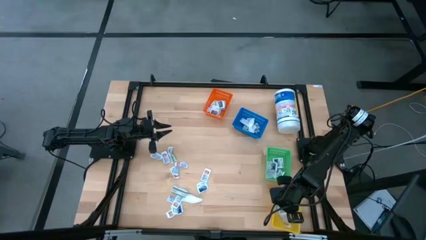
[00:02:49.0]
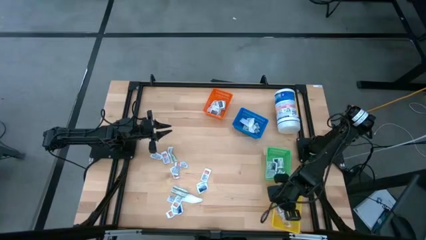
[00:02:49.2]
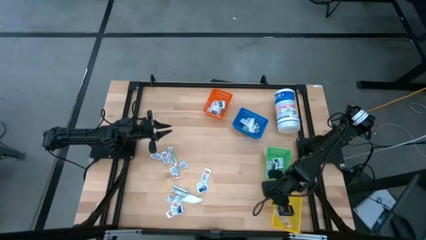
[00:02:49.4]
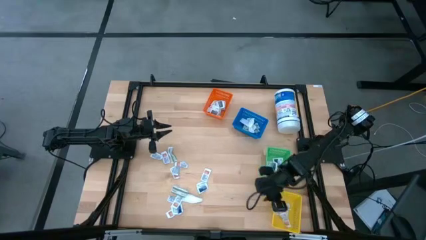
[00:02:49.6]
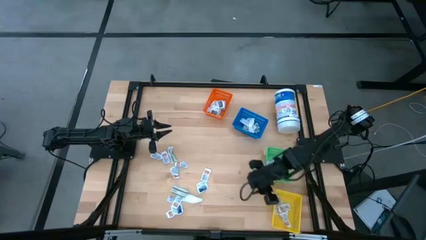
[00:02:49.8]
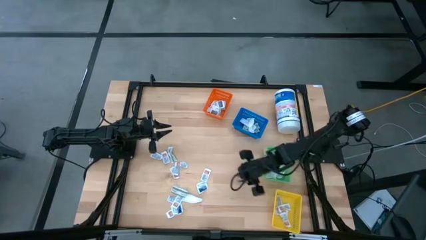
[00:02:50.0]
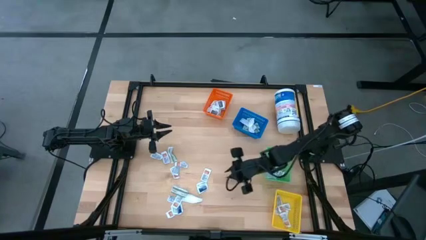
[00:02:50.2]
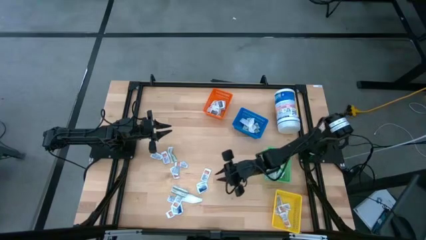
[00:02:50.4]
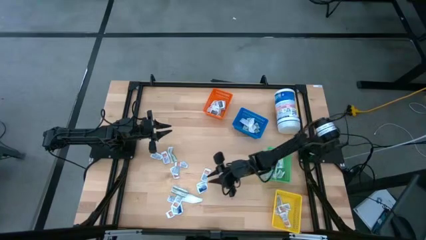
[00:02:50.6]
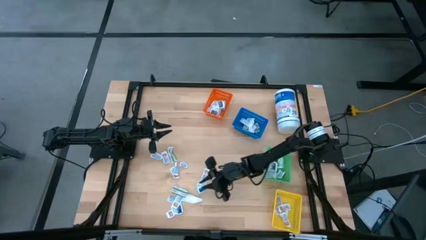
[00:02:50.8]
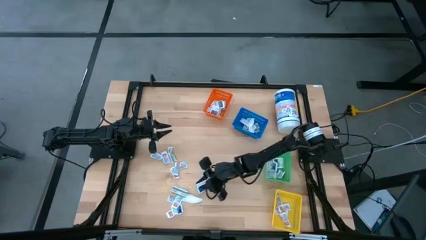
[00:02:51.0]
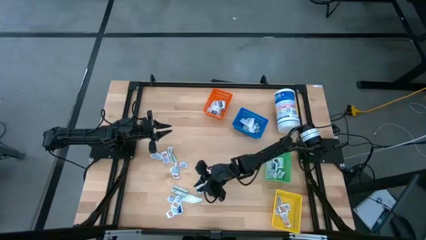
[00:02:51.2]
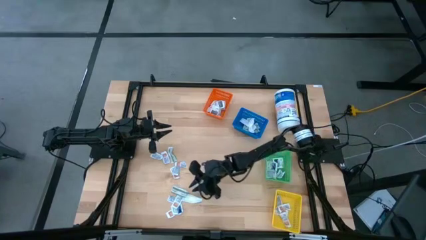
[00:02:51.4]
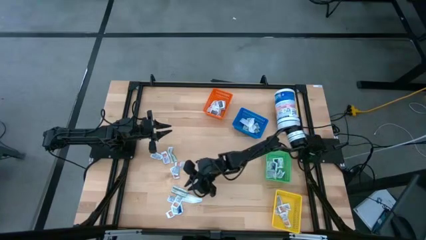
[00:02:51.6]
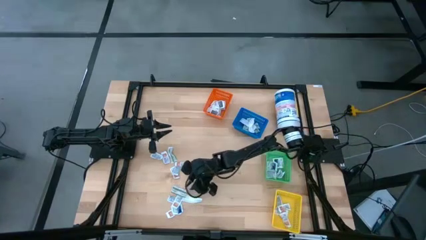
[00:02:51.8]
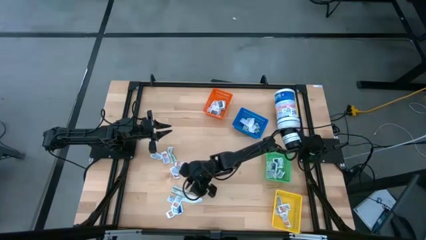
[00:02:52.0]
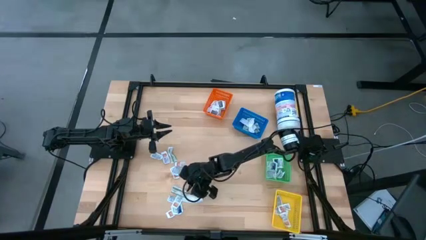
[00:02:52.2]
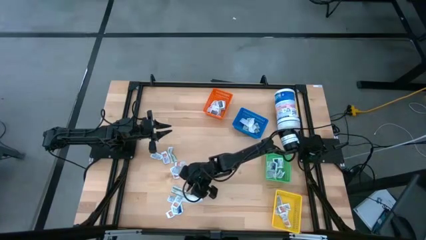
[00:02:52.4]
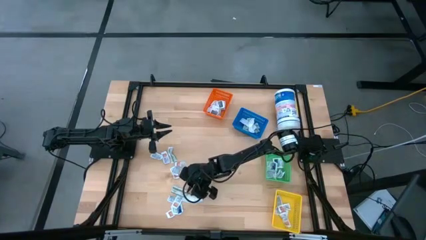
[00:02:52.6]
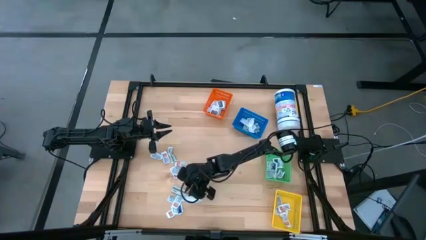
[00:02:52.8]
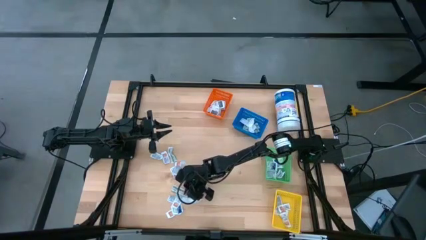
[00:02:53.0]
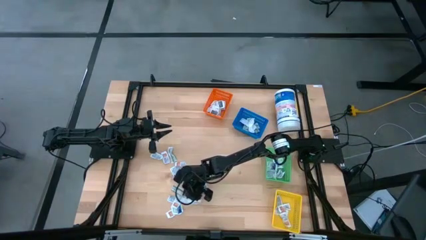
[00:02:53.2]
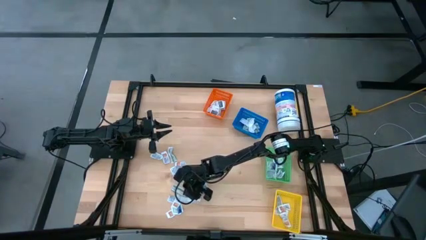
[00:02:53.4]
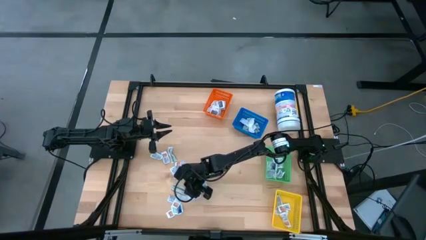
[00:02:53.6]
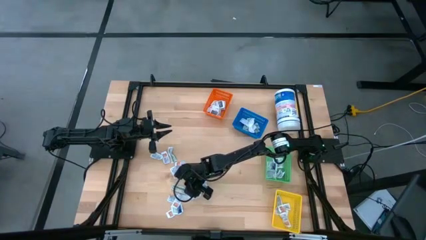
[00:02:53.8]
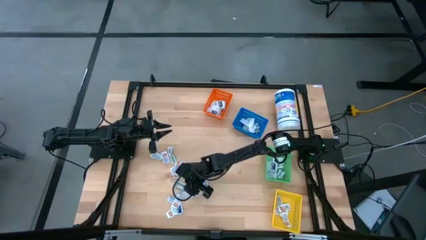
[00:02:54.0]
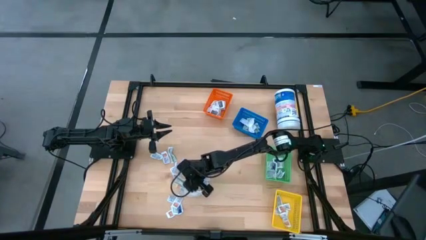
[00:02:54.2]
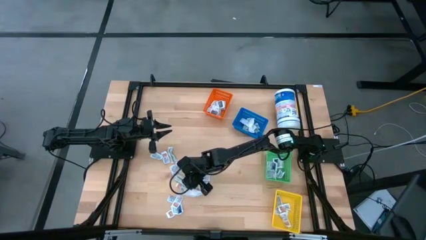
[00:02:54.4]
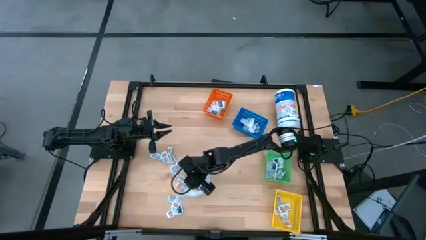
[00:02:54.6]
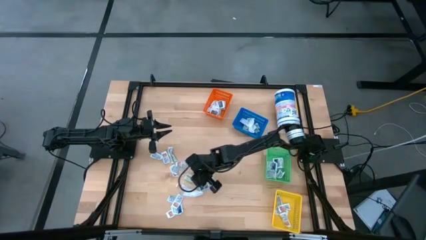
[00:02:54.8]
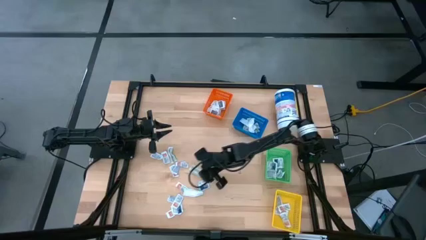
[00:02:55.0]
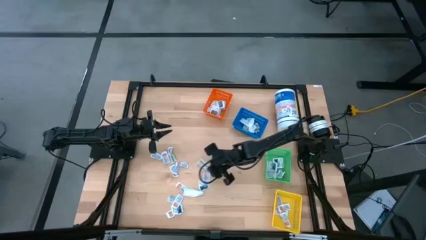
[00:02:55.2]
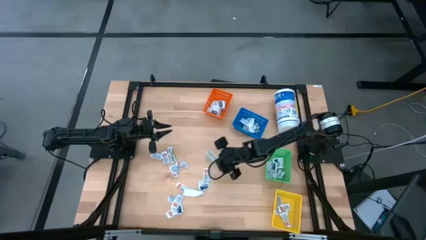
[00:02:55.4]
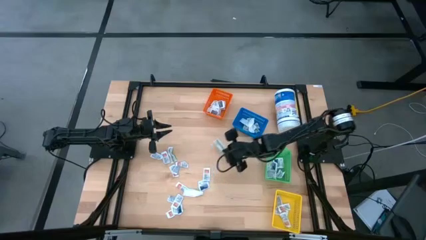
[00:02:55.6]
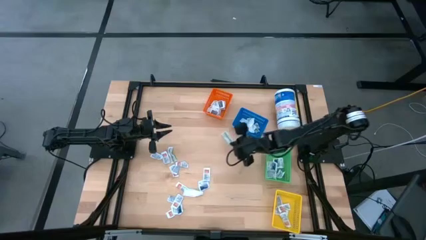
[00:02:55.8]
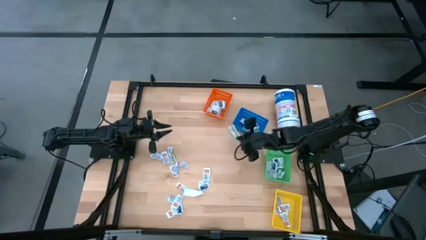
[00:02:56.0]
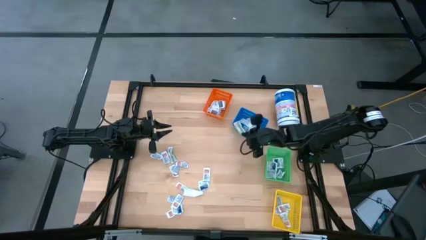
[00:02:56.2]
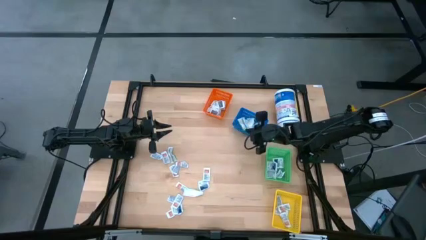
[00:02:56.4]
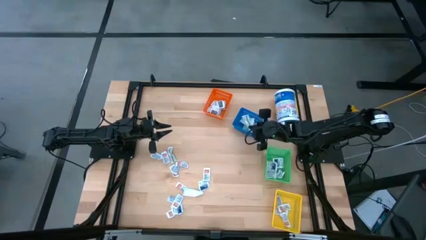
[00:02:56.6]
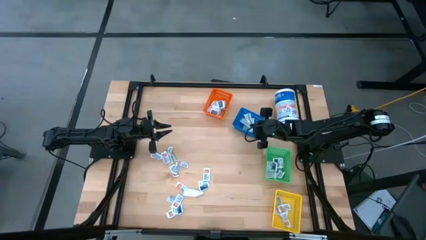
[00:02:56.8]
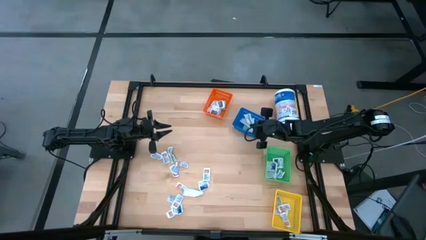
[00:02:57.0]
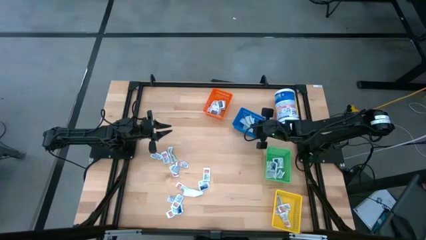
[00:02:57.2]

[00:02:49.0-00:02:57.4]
Task: Pick & Place First Aid Supplies
Put the green bandage pack into the blue basket

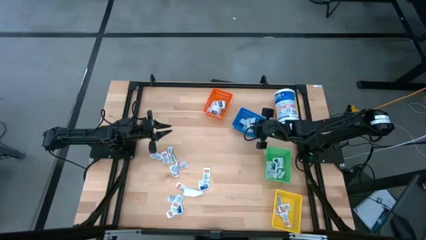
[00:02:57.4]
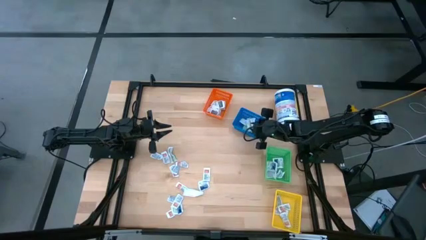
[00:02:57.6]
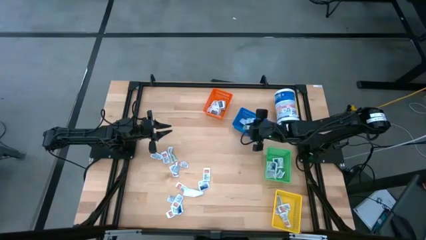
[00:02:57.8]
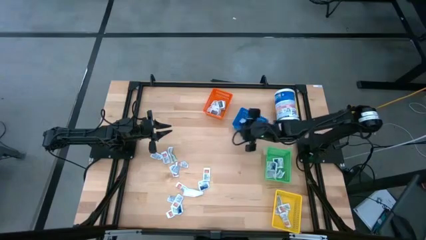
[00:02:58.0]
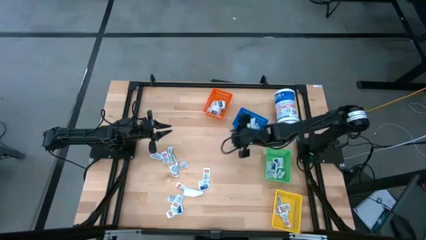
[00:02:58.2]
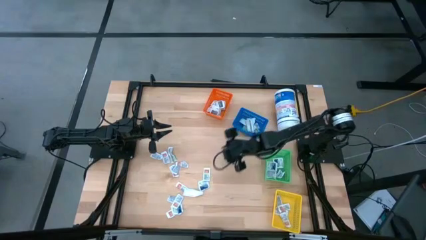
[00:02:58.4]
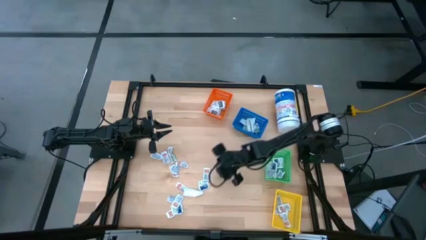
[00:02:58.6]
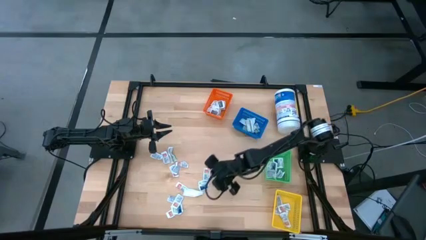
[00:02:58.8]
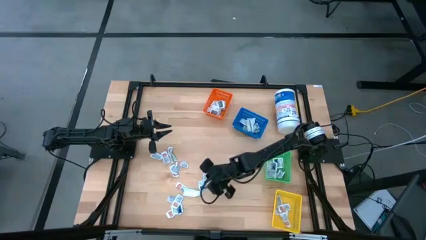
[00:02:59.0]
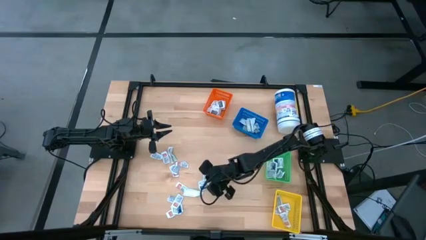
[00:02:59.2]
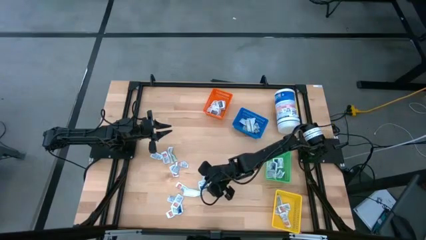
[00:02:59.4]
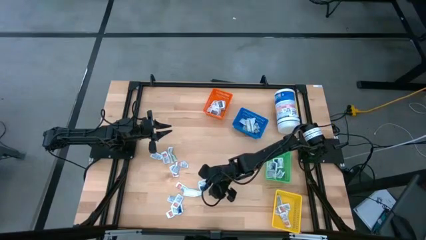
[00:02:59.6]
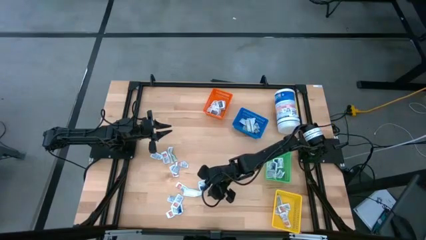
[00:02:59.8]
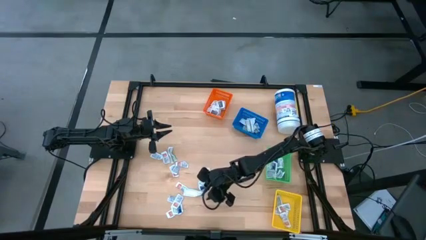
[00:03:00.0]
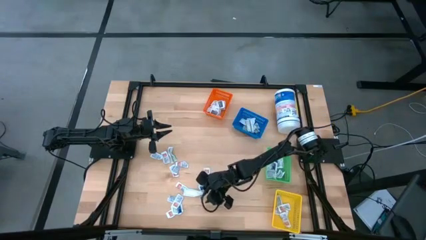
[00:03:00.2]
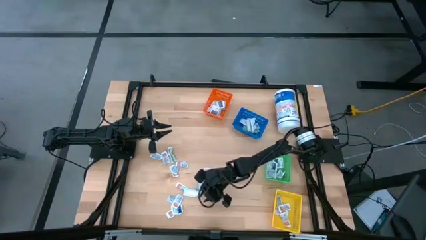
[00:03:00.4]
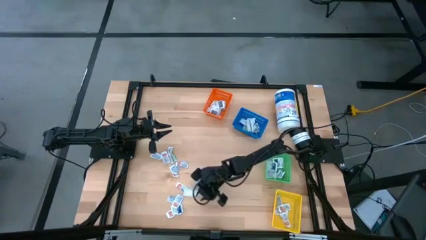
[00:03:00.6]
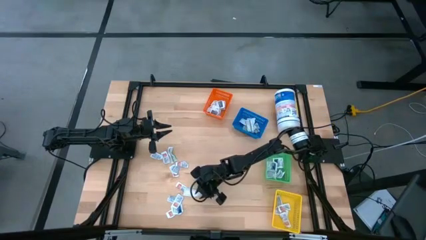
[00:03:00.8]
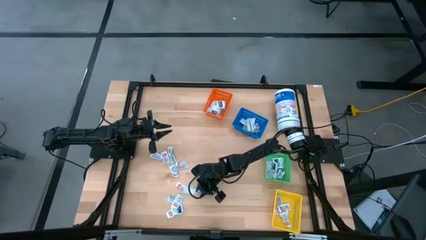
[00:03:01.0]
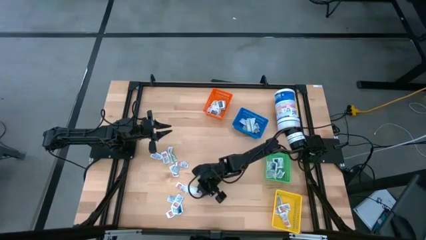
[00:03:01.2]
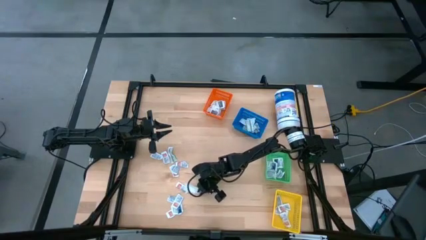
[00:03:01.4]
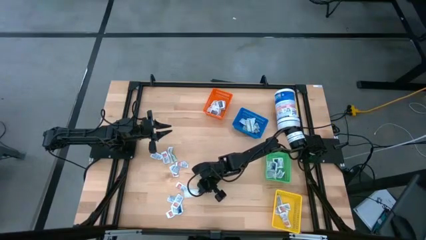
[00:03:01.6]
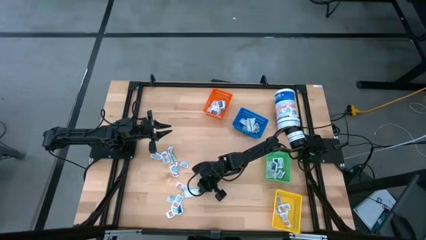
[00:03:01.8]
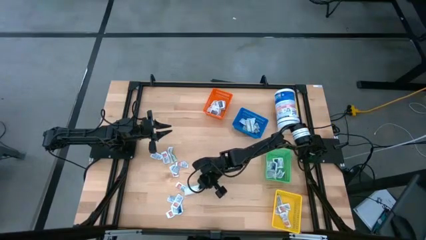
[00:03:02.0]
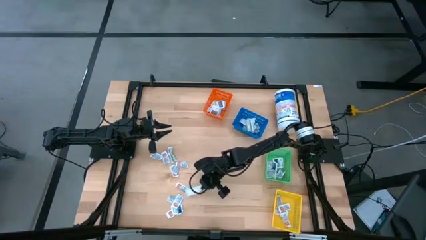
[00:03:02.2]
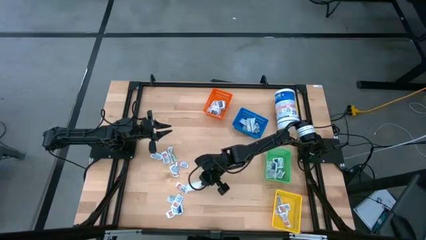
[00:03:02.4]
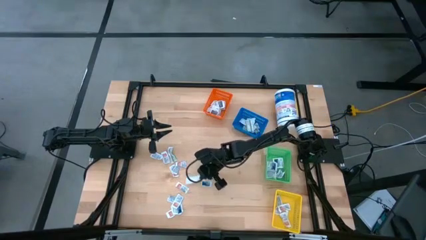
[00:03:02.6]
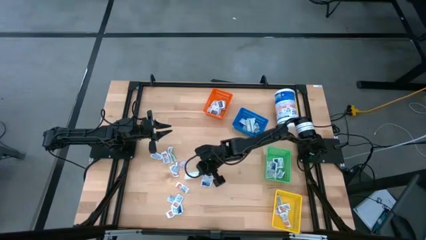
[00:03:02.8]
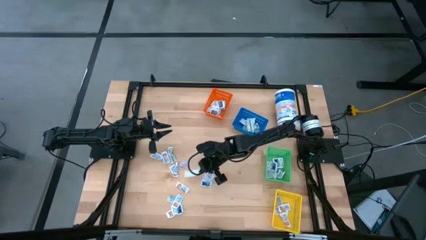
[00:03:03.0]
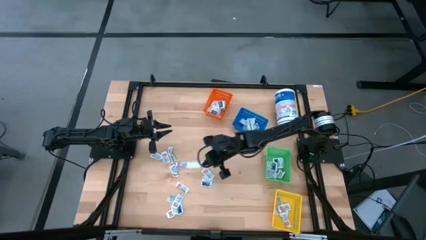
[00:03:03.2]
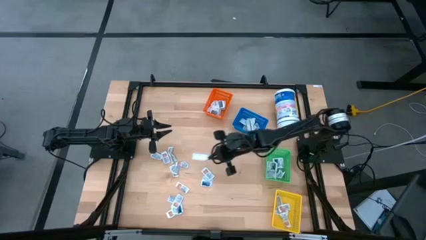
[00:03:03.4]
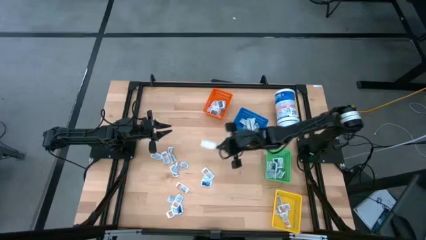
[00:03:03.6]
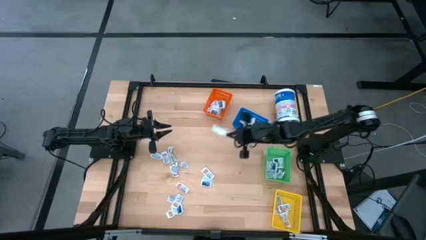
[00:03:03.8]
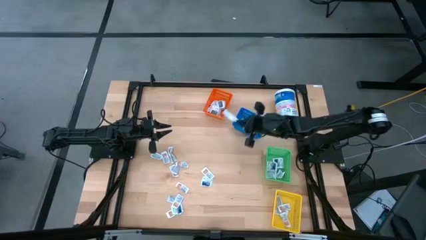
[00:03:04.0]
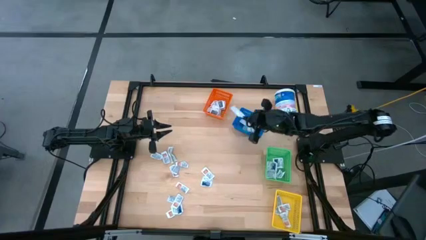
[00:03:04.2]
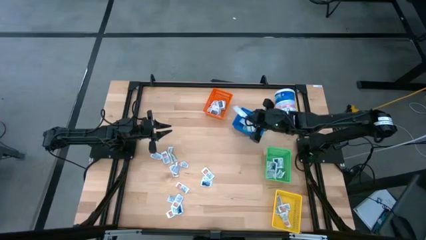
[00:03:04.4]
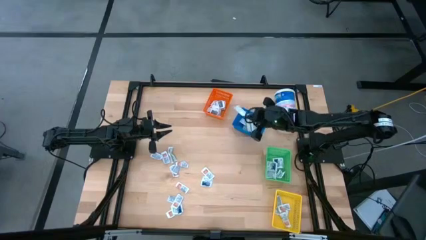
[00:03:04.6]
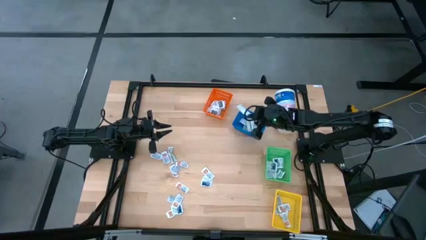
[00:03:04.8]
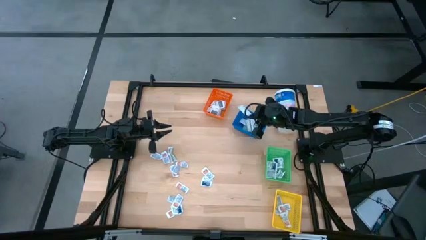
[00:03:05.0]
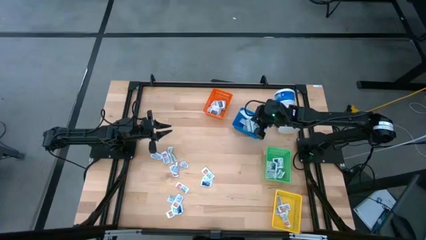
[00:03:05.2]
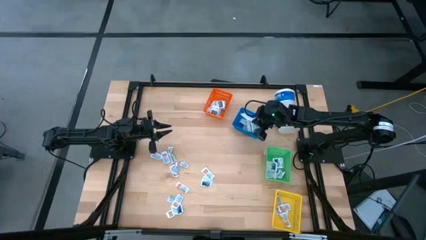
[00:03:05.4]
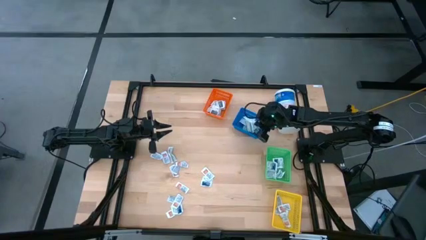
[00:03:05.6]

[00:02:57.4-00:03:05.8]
Put the green bandage pack into the blue basket
